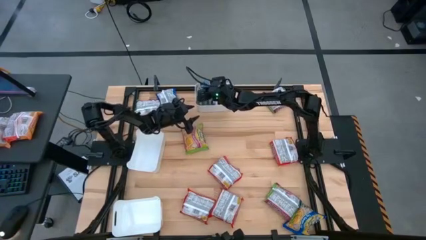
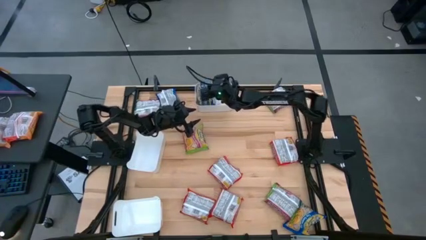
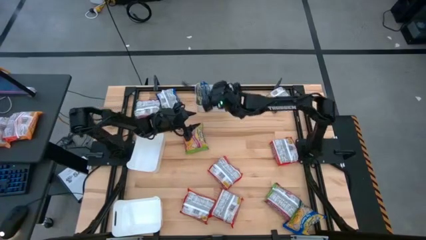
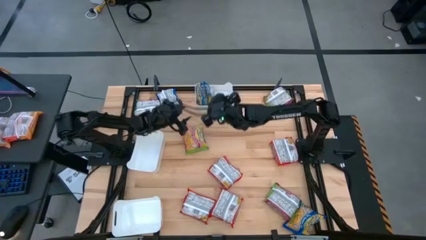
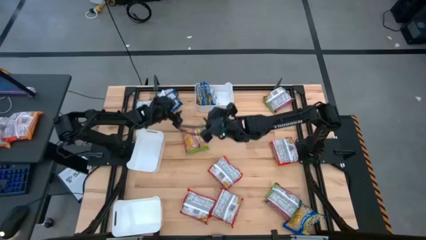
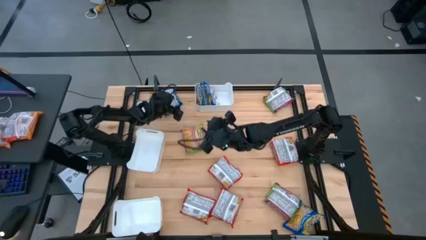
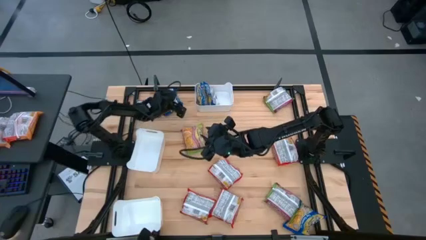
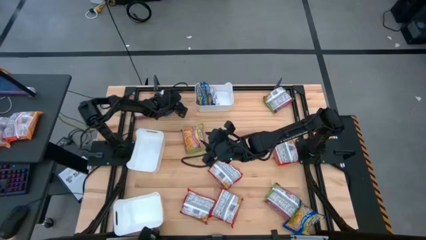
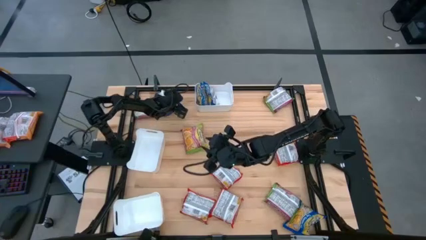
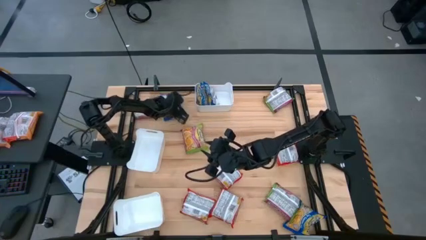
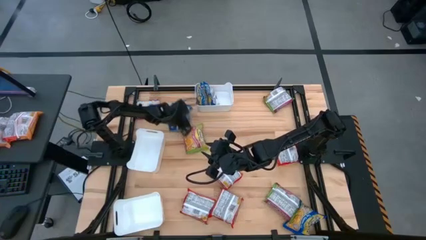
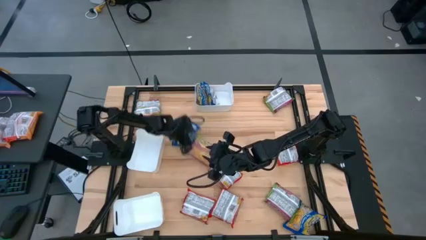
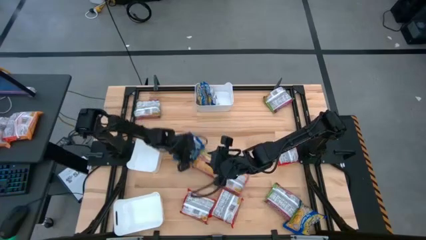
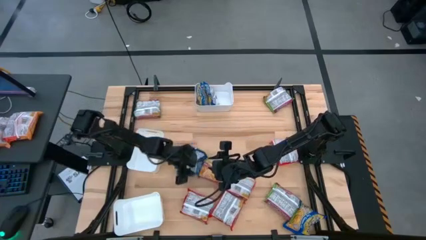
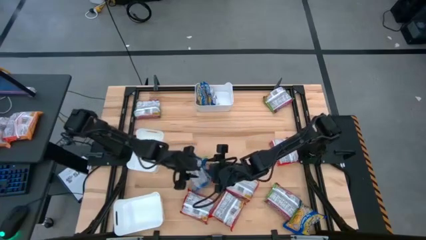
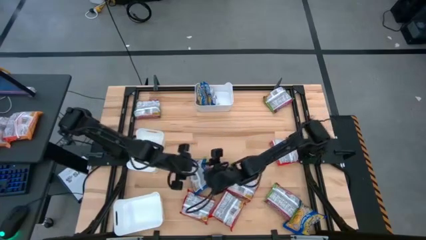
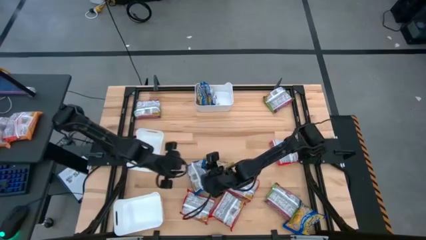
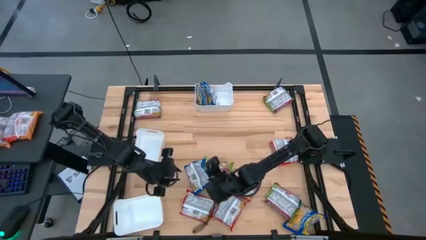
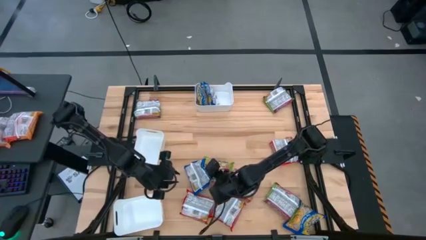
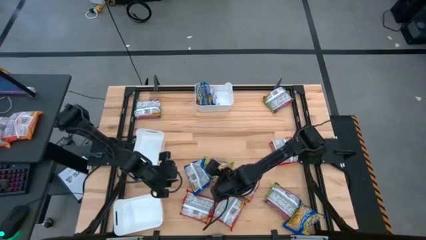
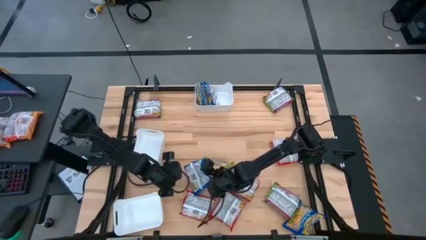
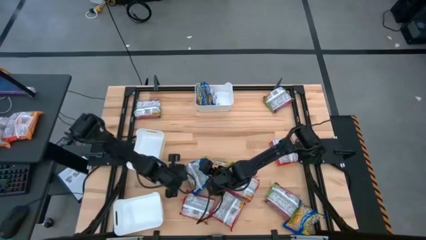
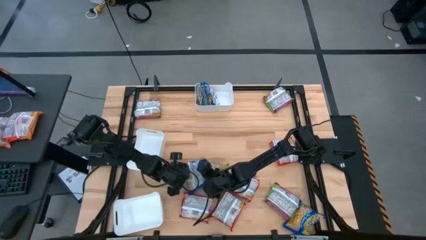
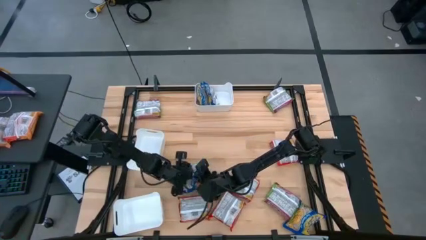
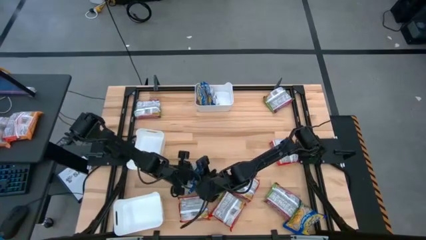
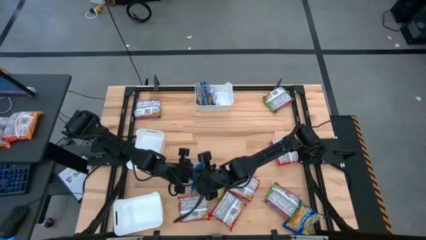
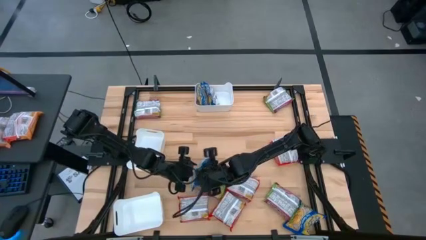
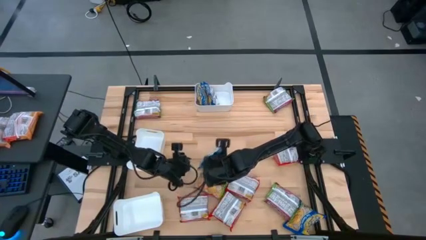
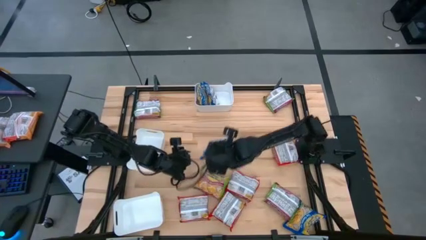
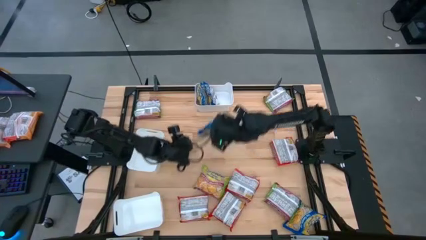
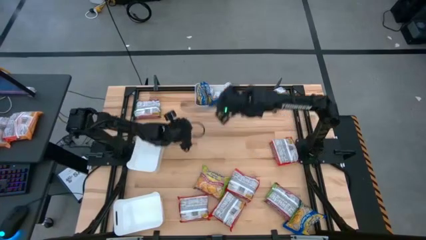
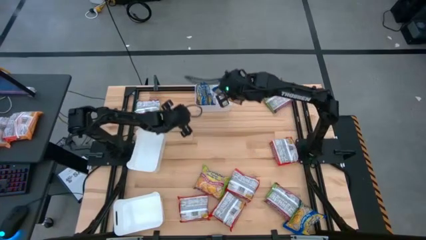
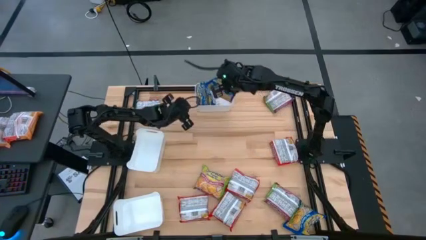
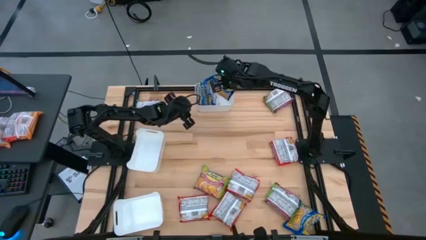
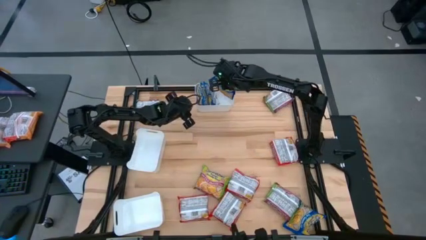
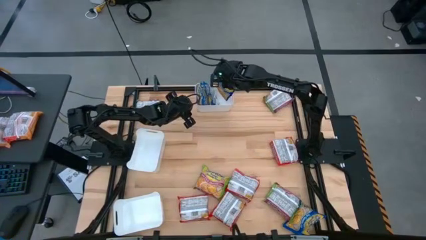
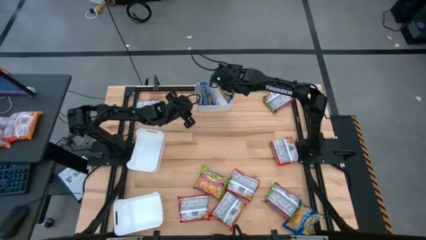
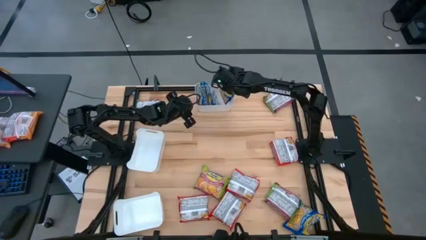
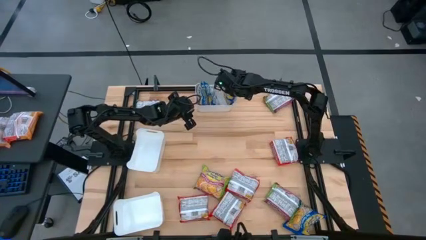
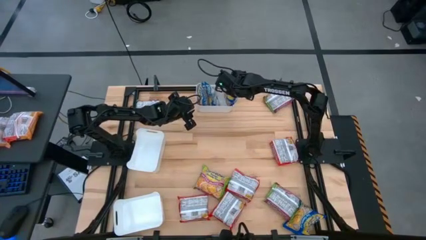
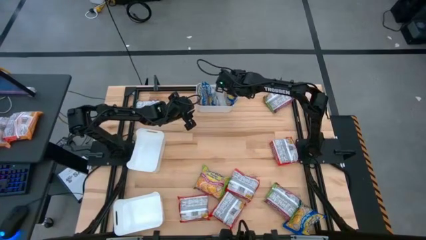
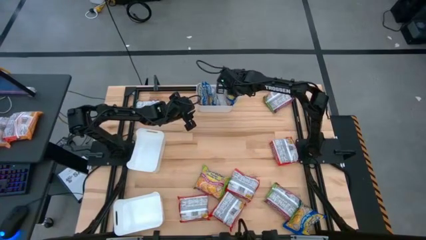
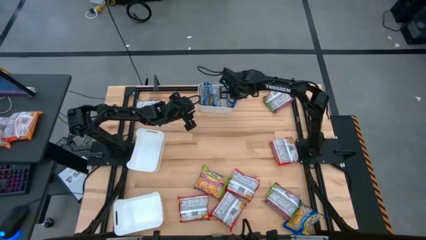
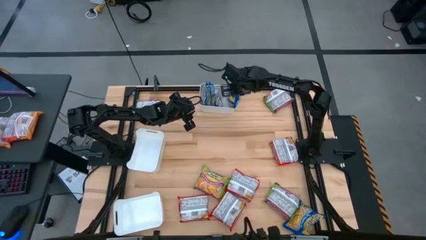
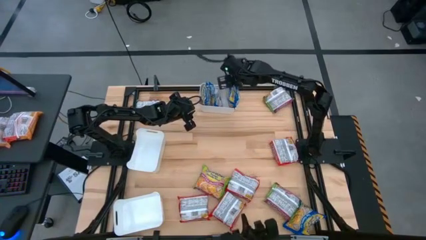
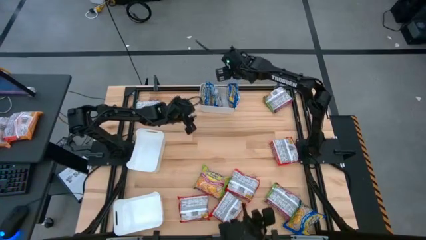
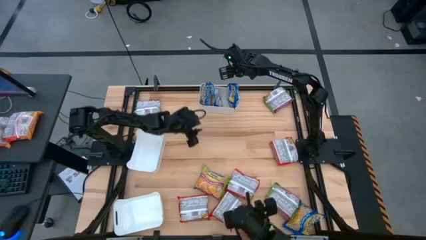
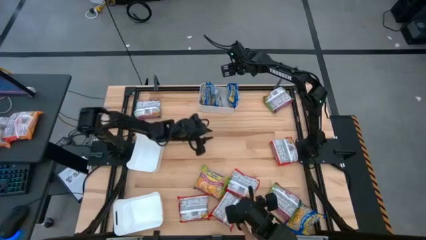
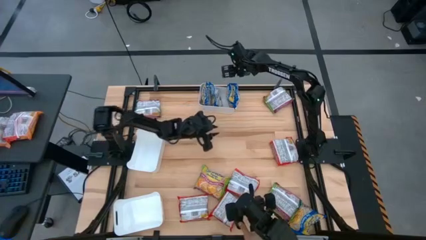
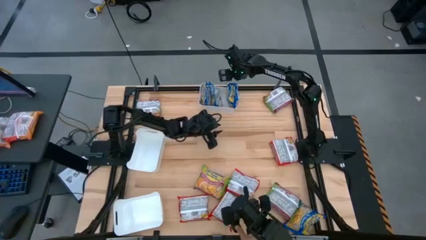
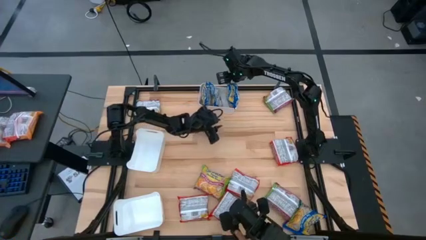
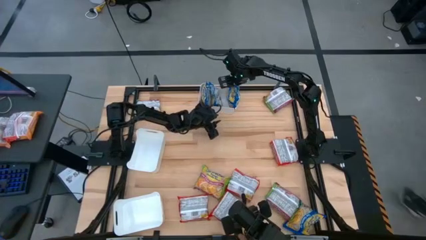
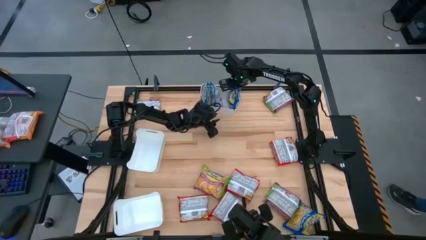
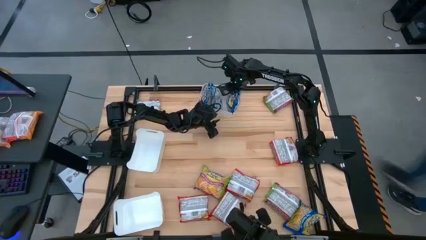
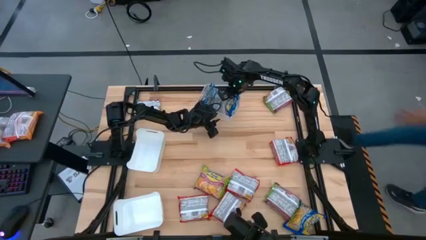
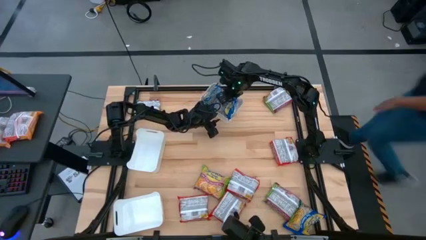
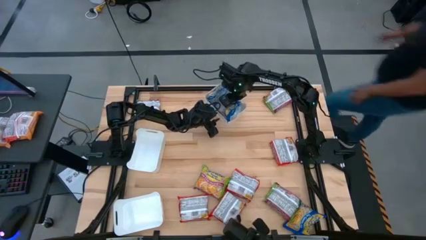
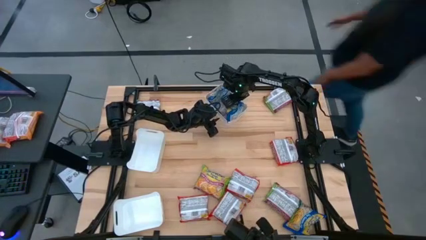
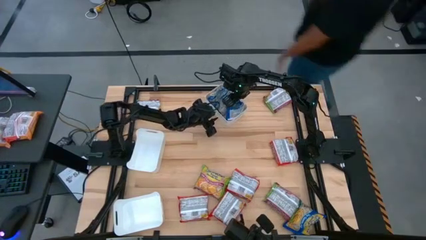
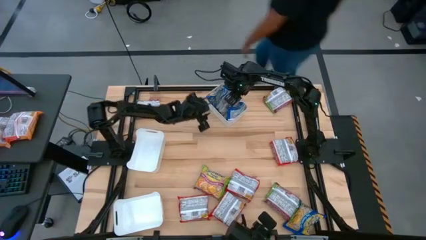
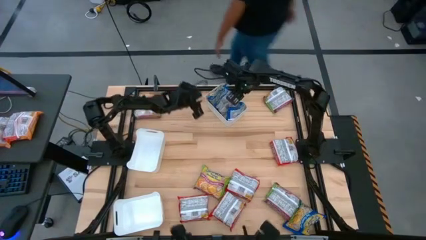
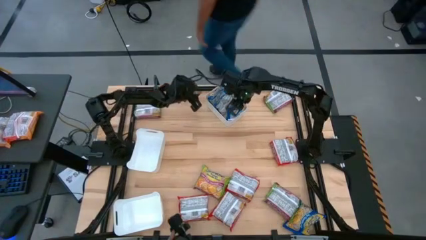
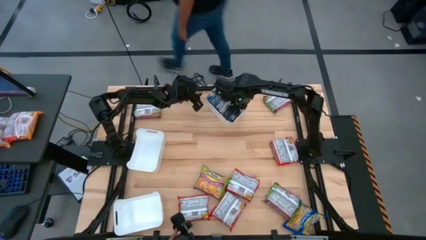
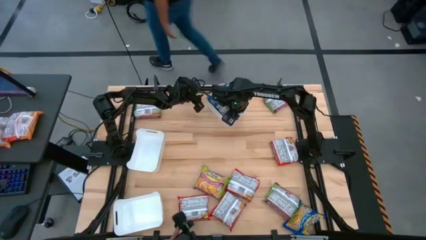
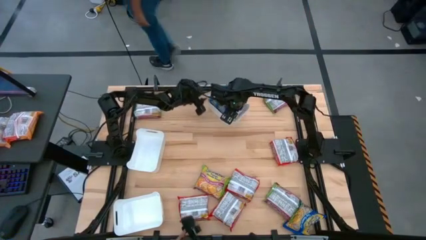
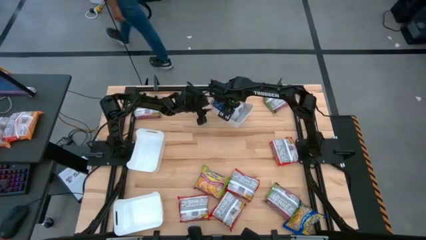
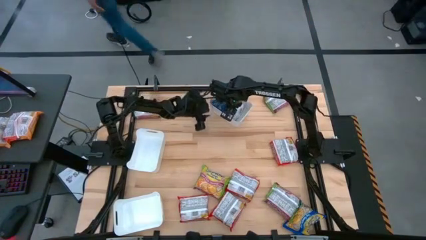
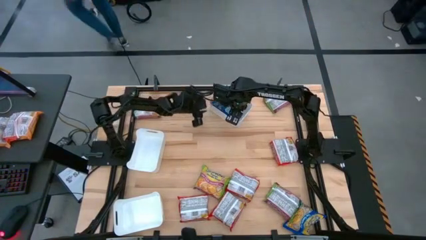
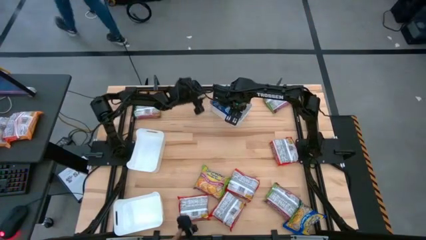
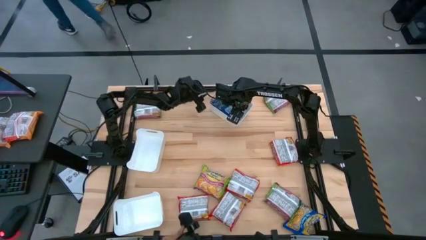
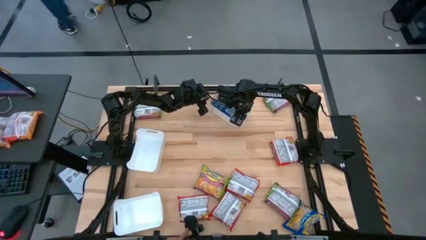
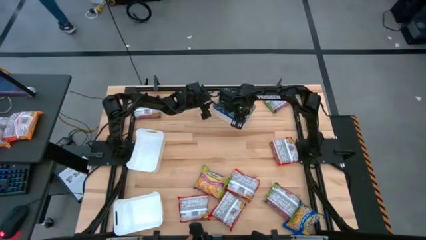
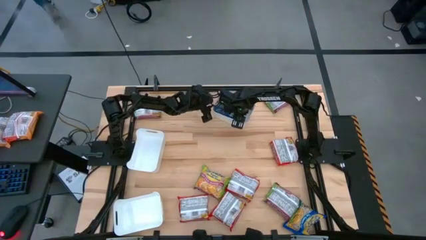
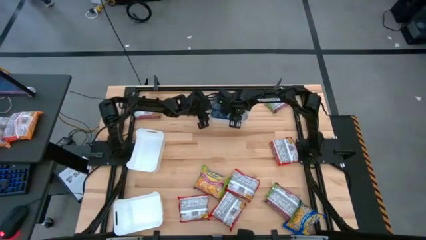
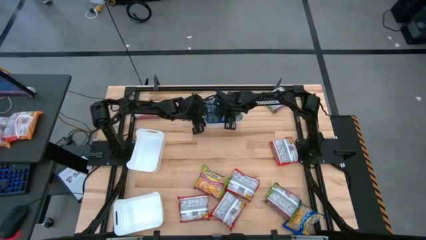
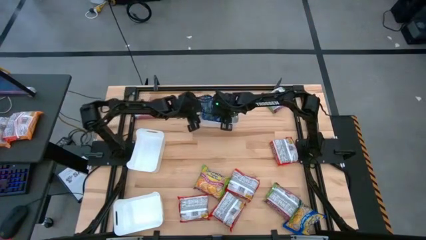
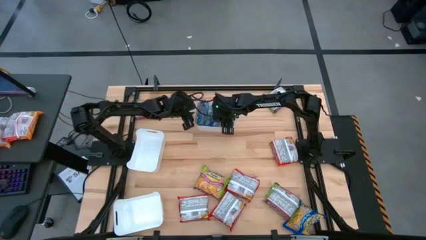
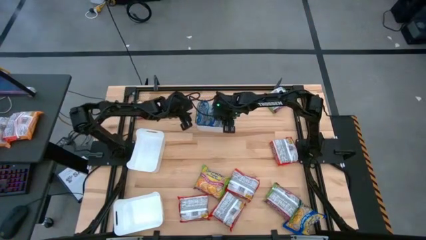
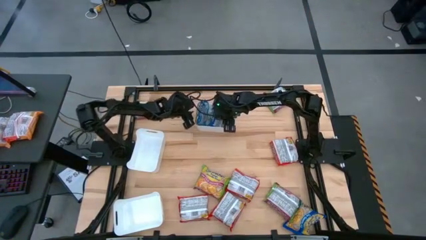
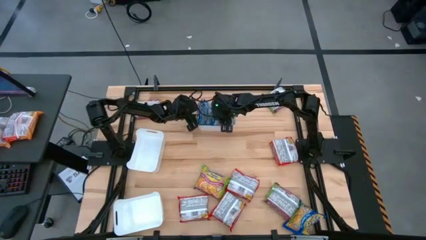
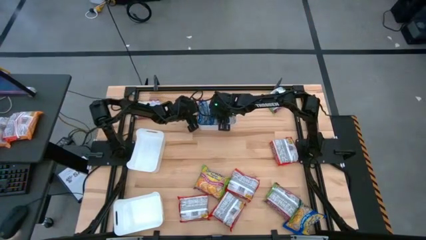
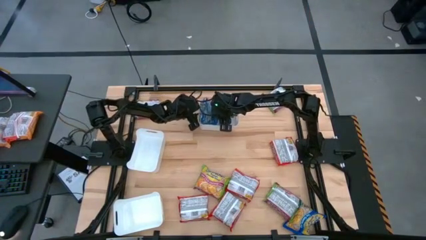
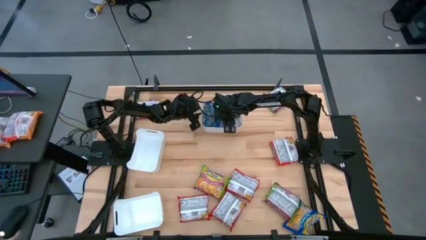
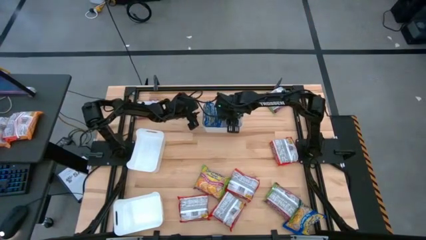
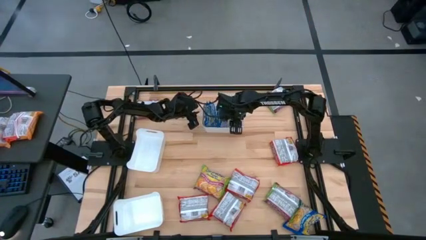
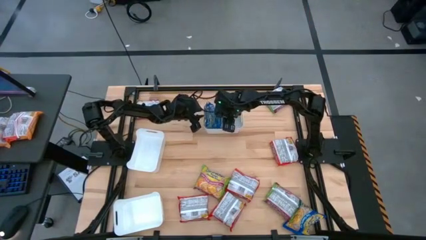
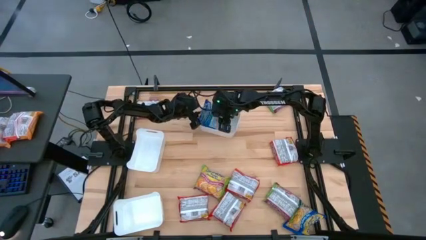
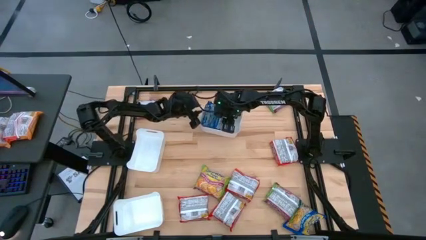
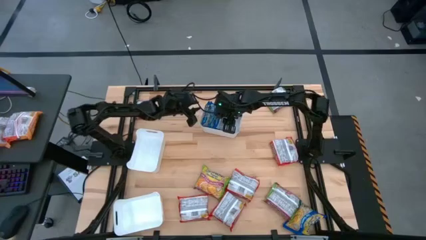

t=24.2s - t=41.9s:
Task: Sort Maruchan noodles
Put the blue noodle pack into the top white bin
